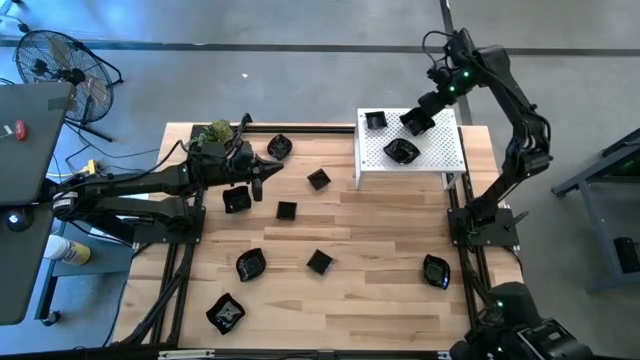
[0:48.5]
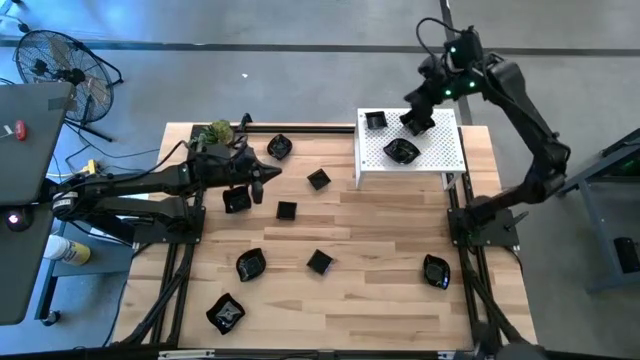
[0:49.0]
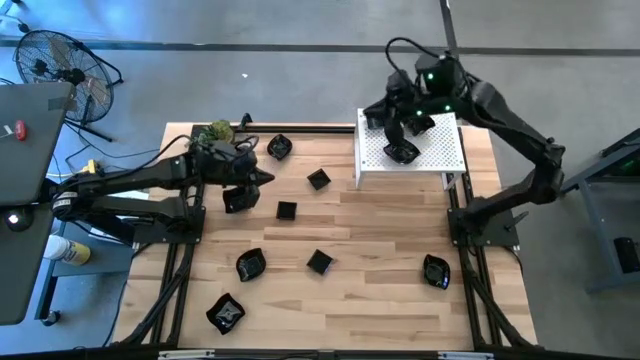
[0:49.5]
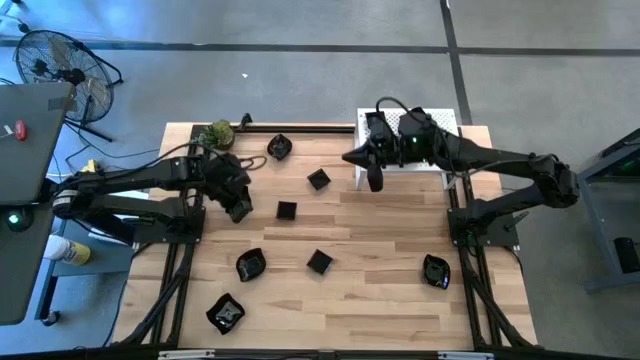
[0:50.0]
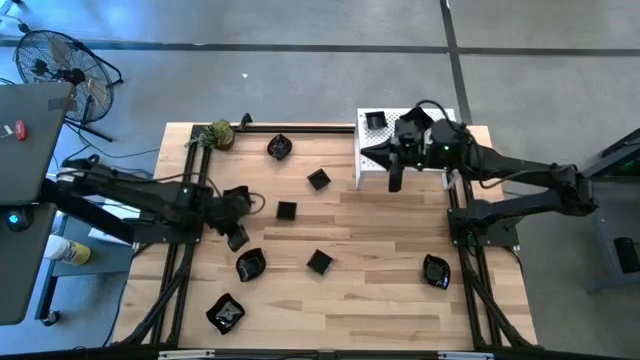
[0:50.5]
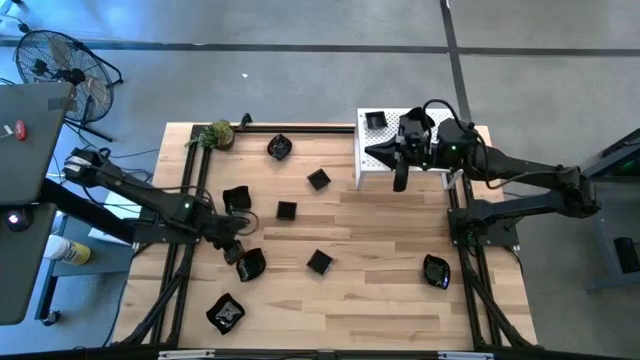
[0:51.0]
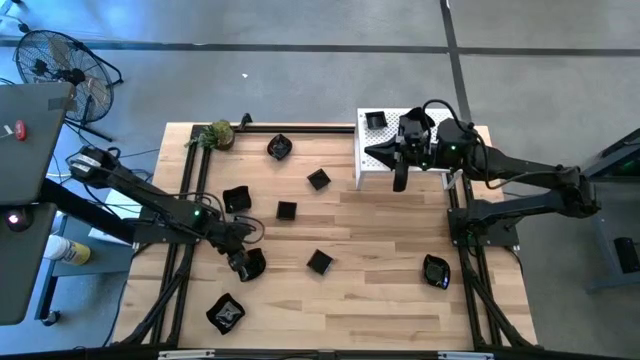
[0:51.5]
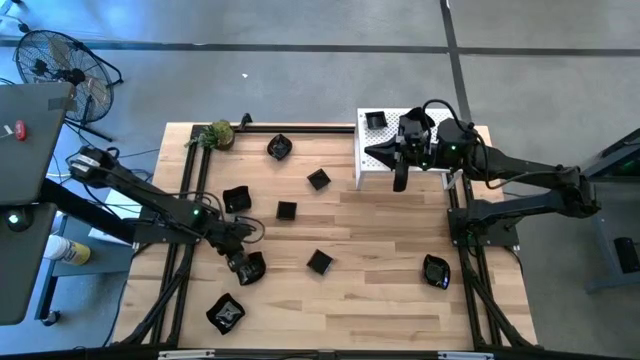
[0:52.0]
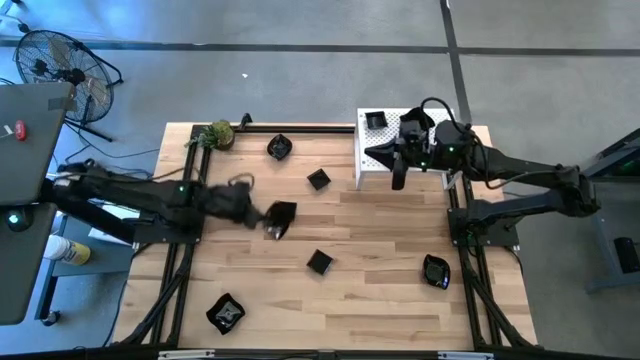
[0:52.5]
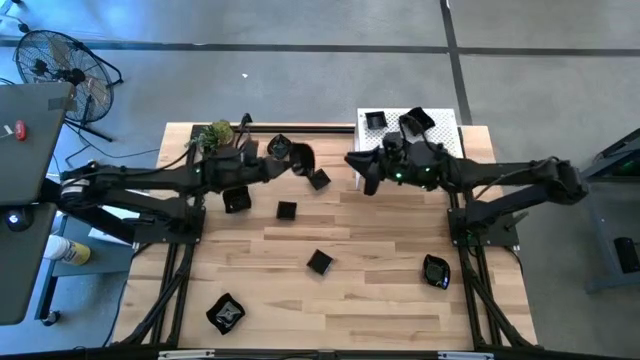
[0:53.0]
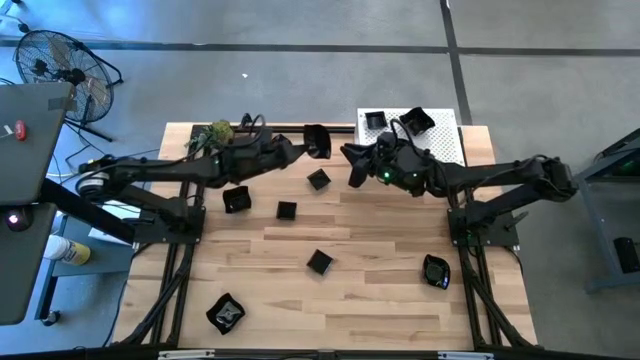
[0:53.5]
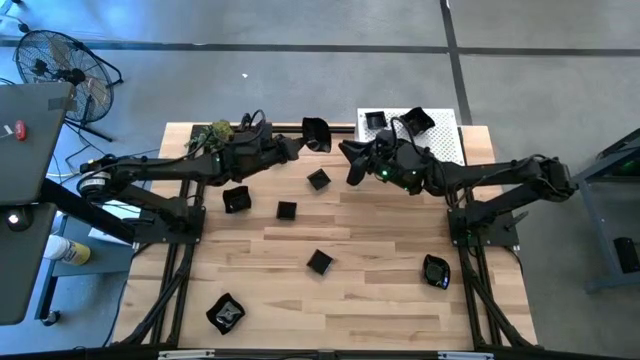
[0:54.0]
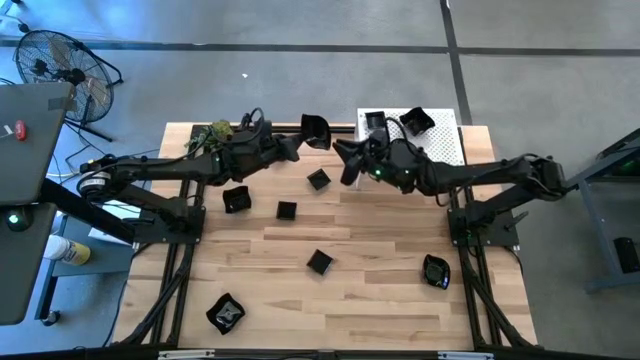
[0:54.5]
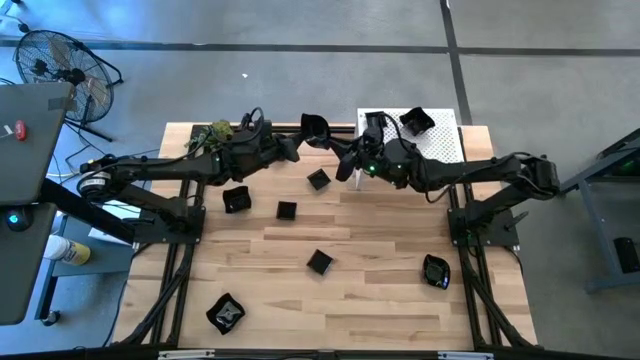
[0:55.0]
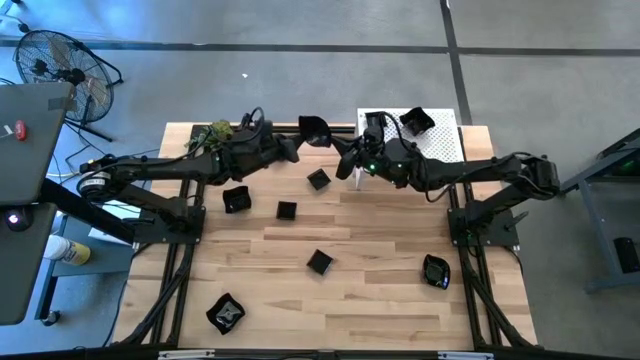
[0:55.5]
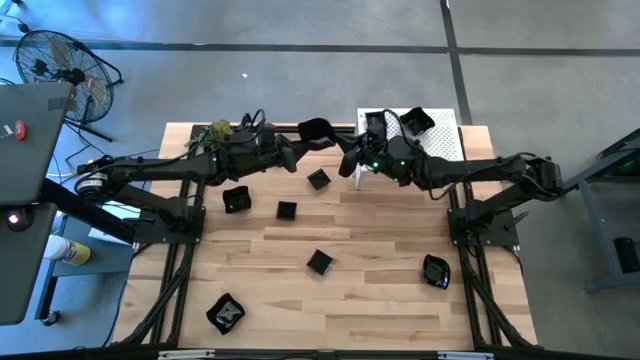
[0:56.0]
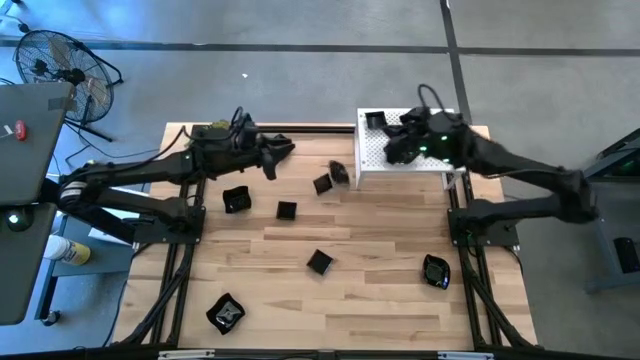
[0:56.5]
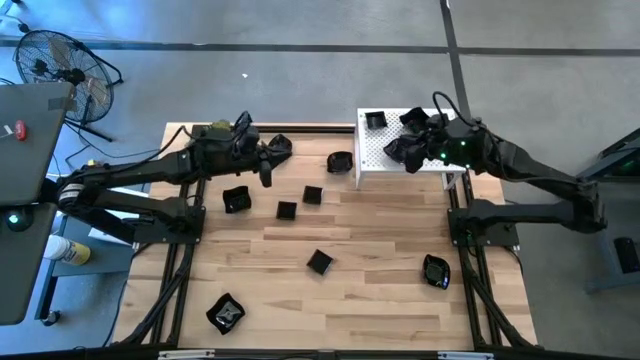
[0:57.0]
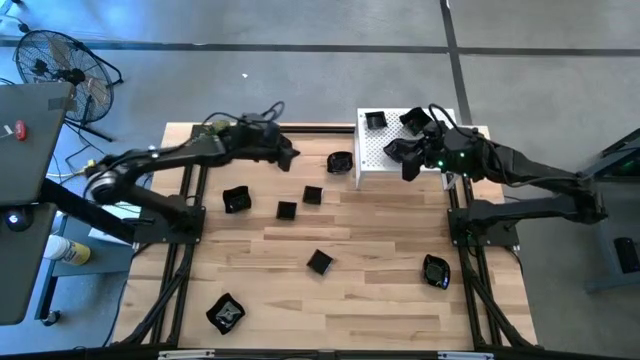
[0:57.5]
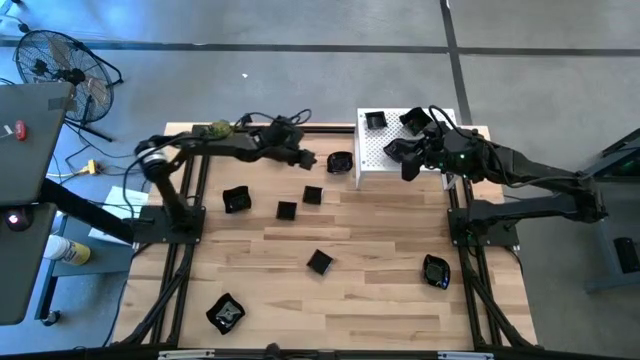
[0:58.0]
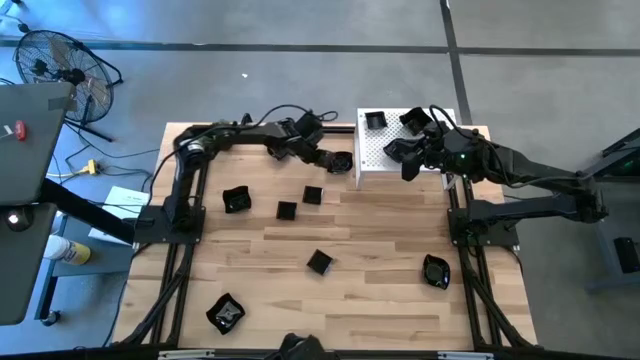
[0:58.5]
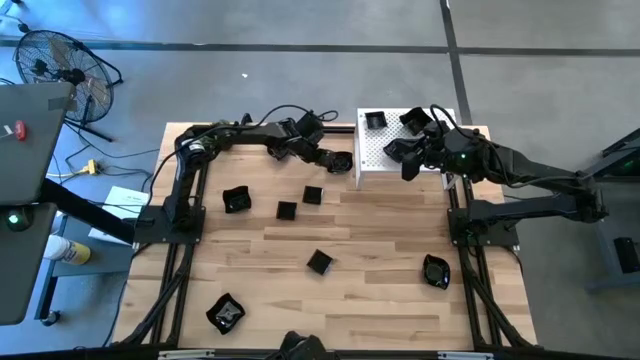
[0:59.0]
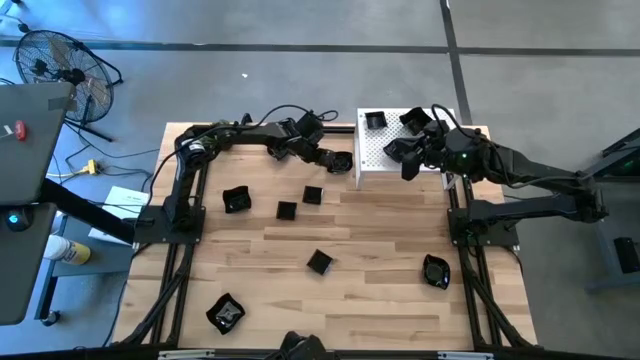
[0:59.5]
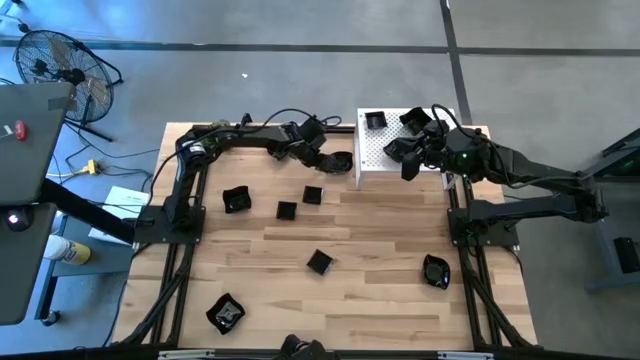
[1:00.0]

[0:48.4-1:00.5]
Task: Pick & Place Mini shaped plates
Stack the leaf-shaped plate on top of the leaf-shaped plate on the shelf

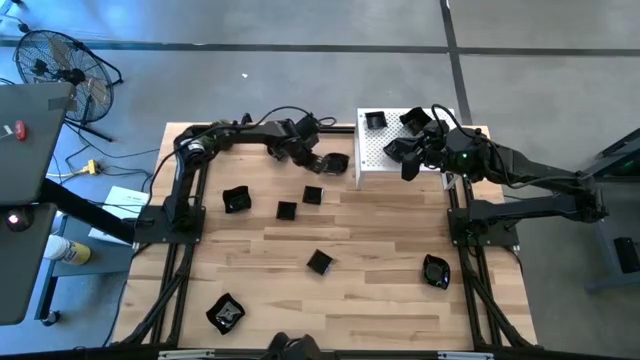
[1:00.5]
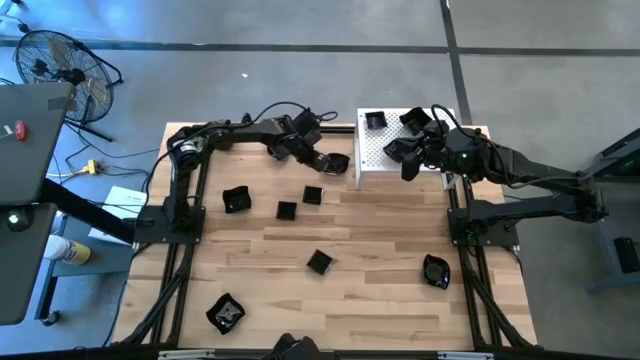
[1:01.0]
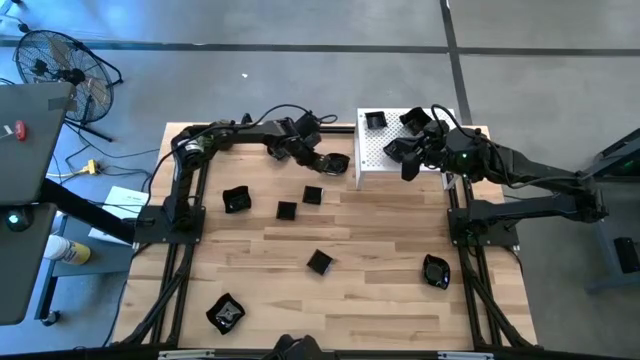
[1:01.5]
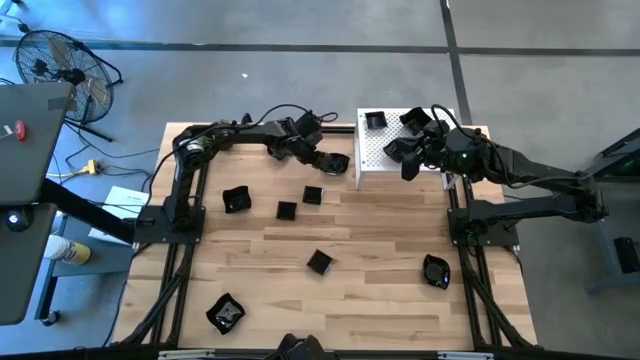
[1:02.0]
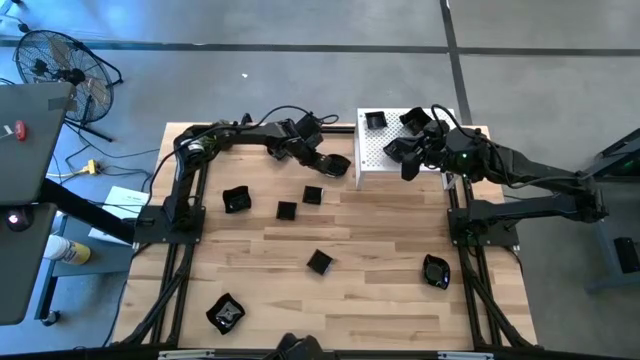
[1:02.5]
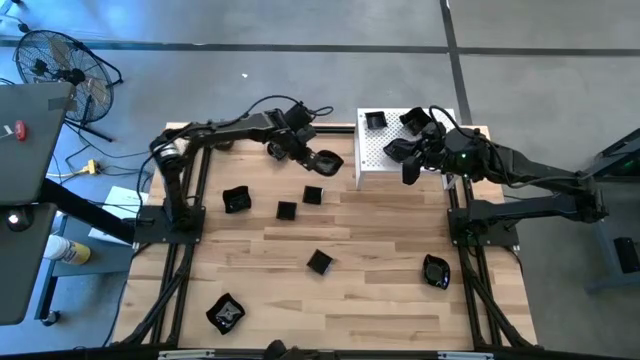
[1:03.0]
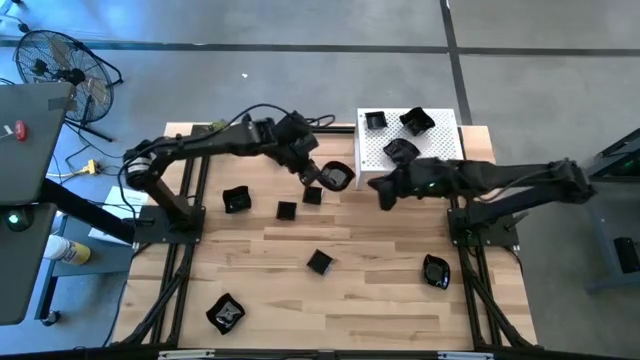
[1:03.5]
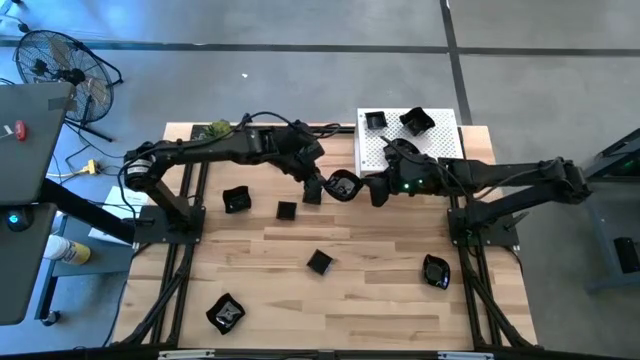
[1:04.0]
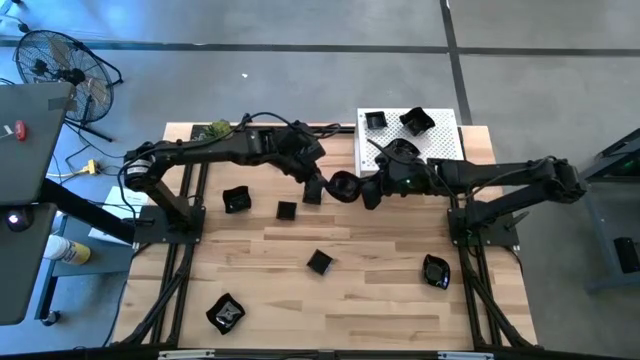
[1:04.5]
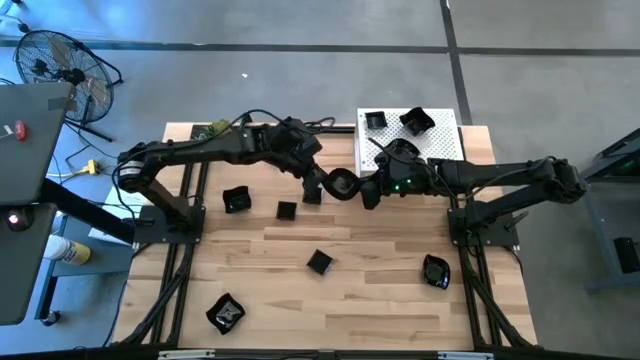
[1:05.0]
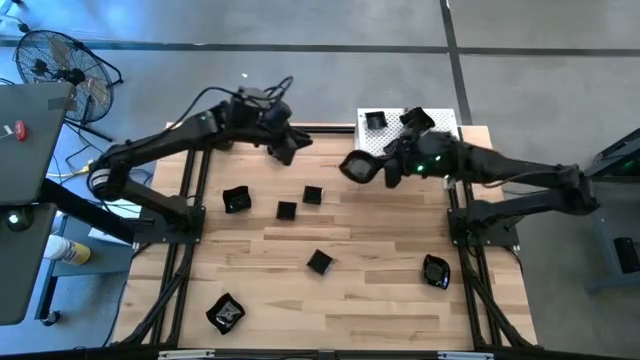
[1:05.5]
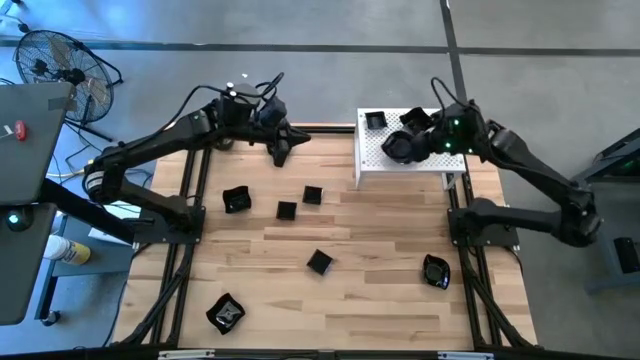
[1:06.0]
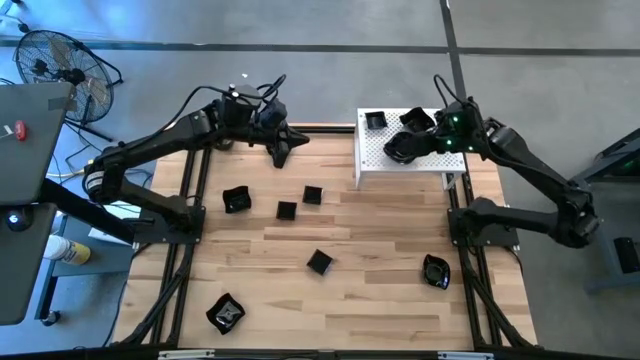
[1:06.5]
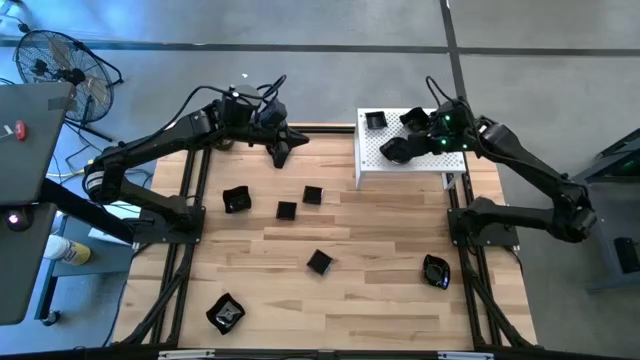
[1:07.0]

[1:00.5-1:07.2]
Stack the leaf-shaped plate on top of the leaf-shaped plate on the shelf

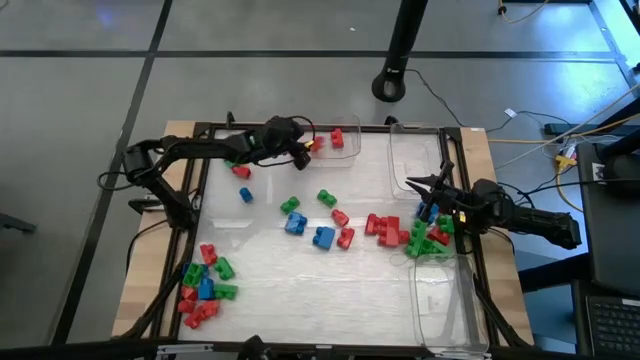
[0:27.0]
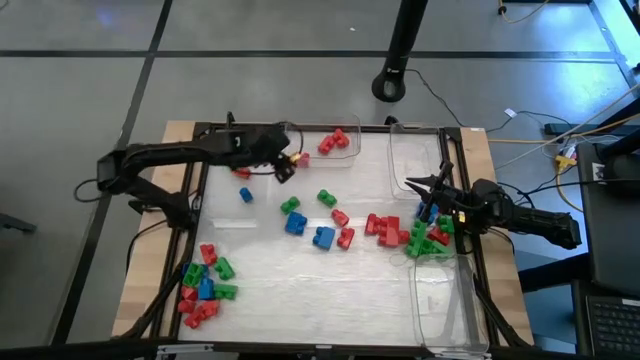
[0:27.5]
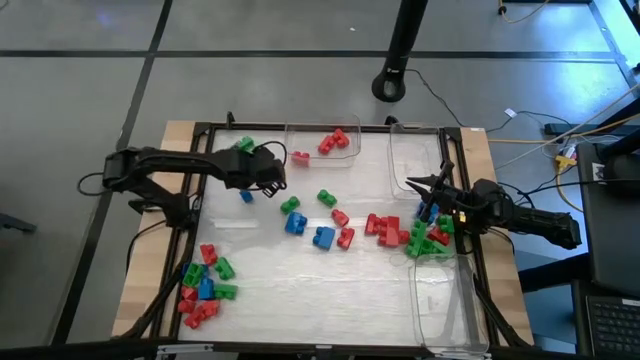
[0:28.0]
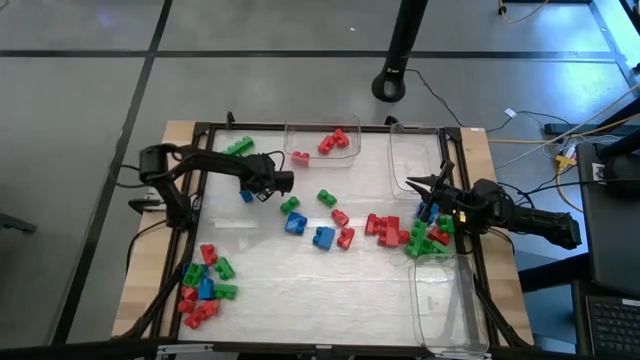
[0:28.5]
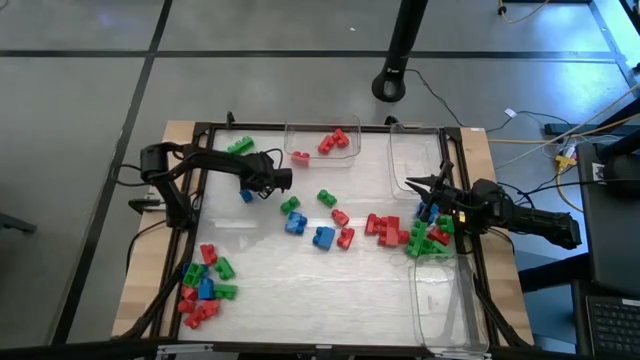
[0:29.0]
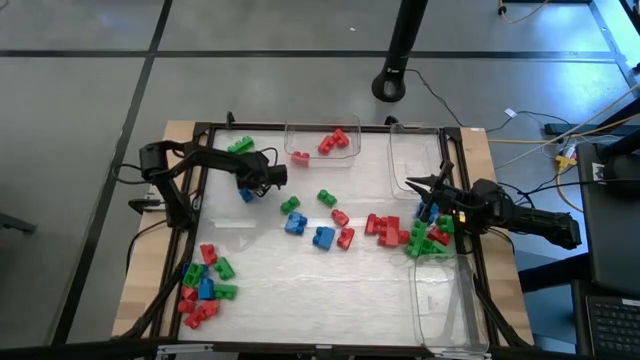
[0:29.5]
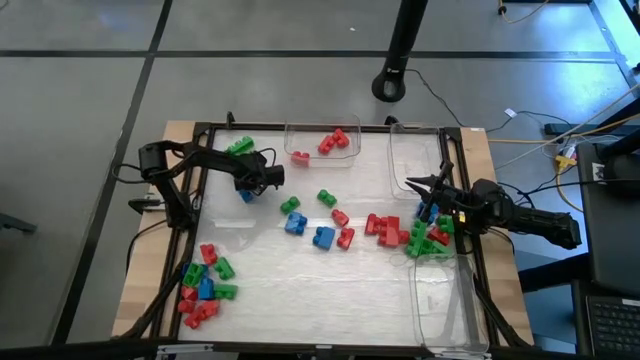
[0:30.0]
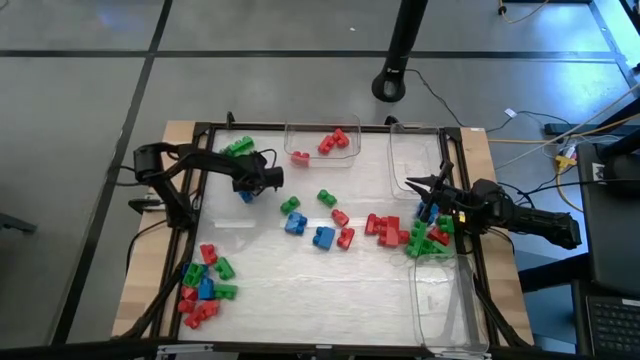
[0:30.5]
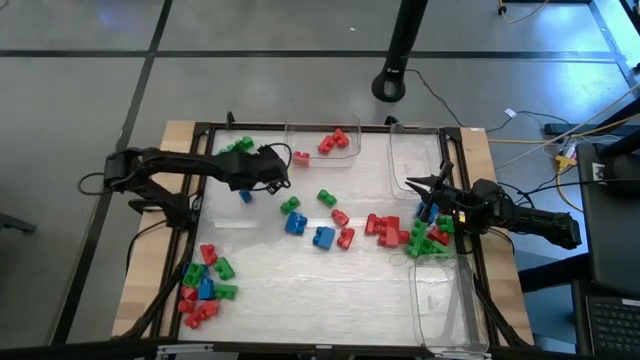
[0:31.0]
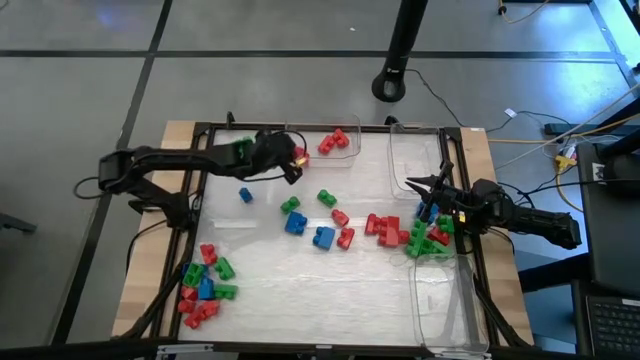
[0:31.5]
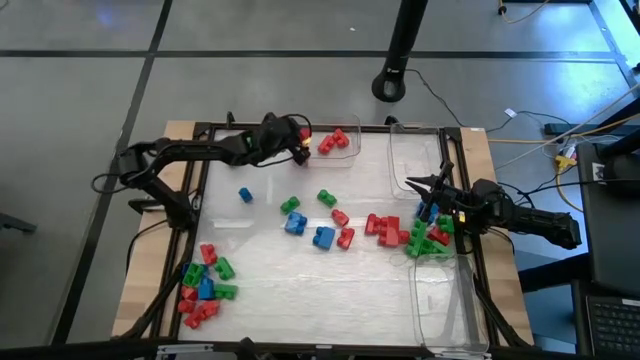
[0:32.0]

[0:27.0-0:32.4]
Task: Sort blocks
Put the red game piece into the top left transparent bin
